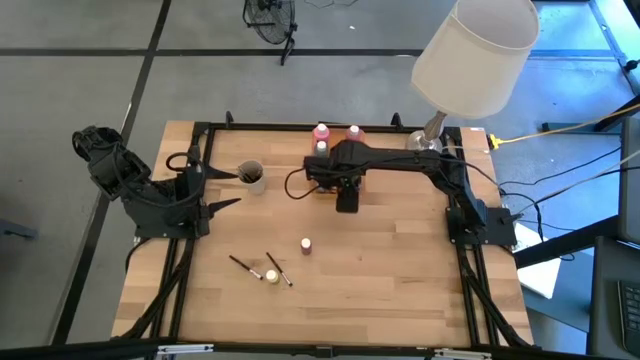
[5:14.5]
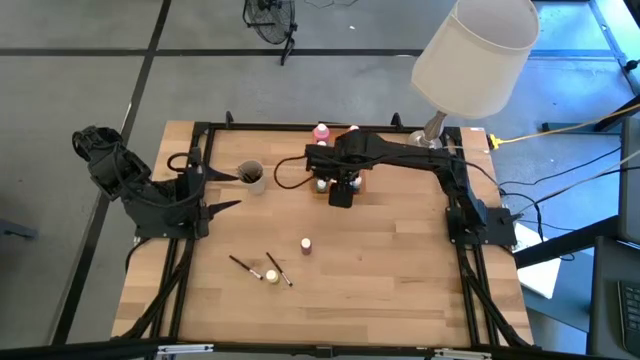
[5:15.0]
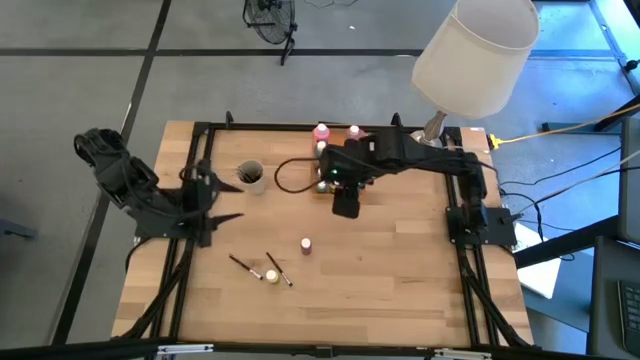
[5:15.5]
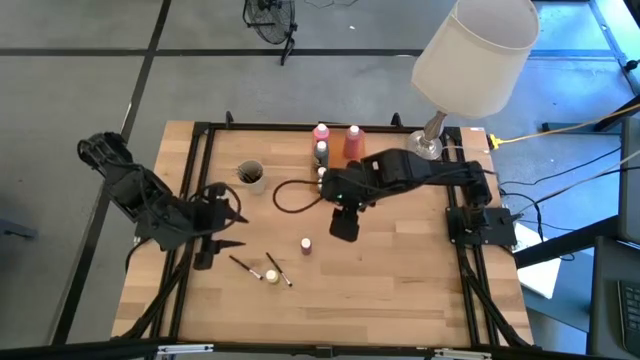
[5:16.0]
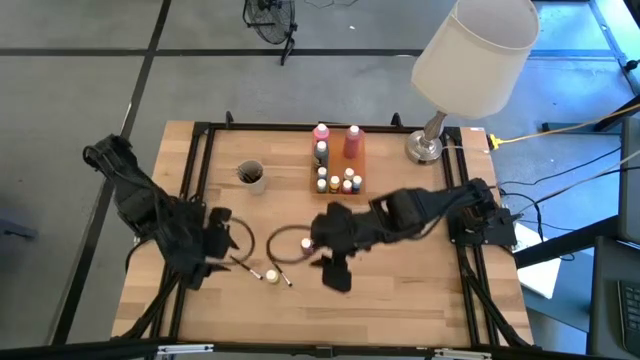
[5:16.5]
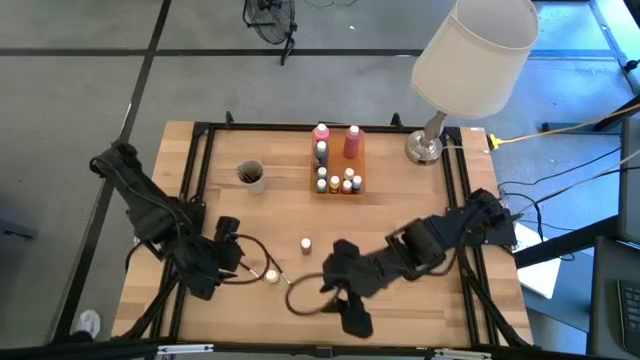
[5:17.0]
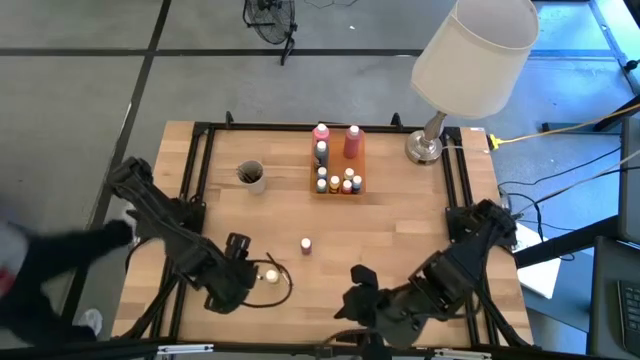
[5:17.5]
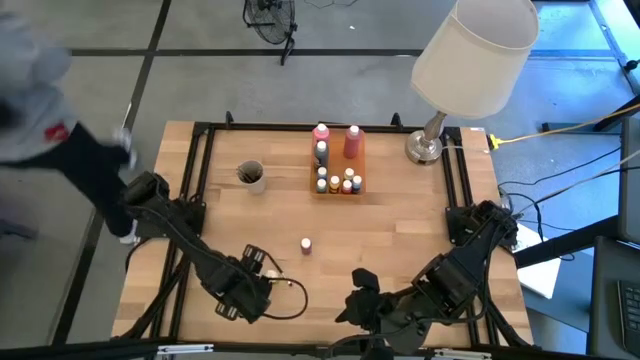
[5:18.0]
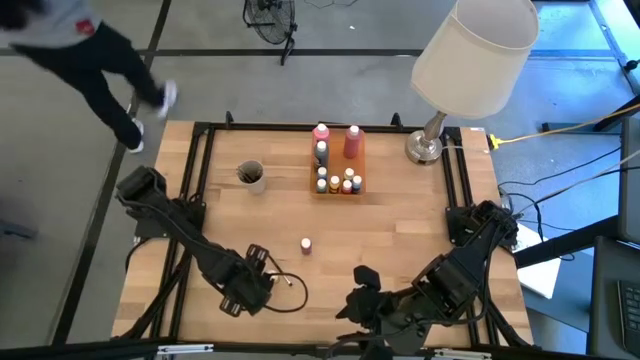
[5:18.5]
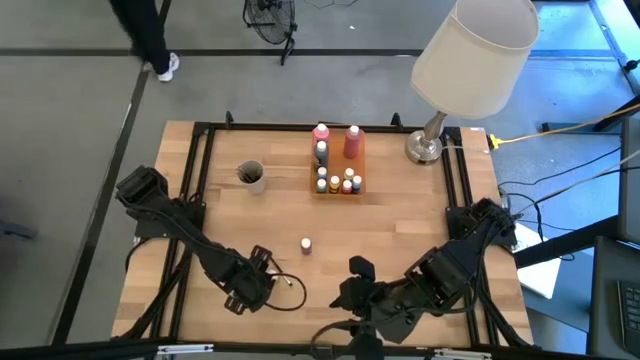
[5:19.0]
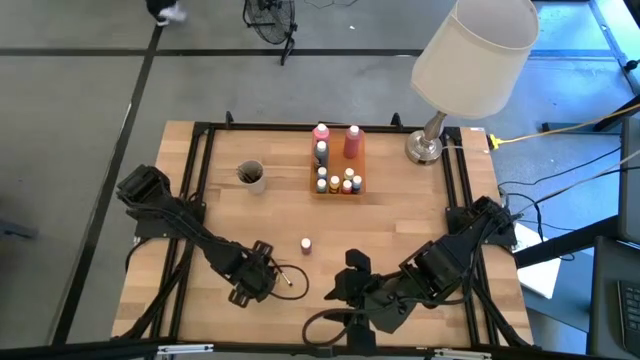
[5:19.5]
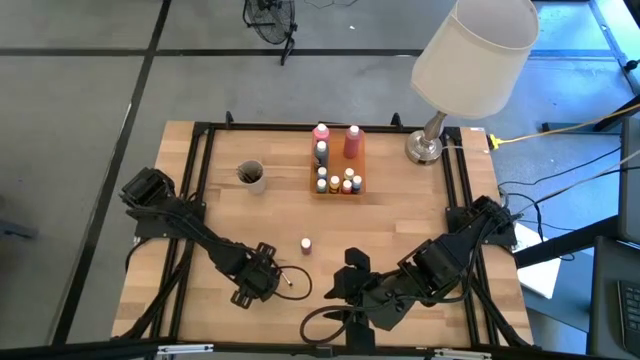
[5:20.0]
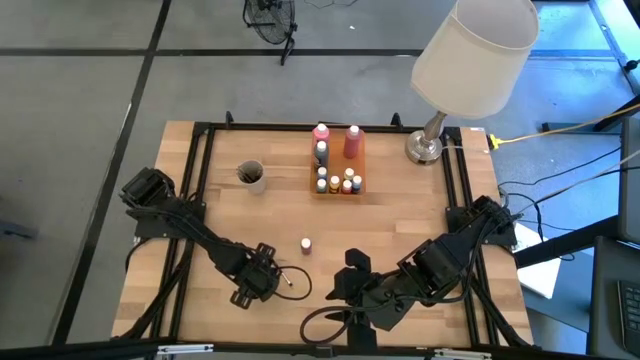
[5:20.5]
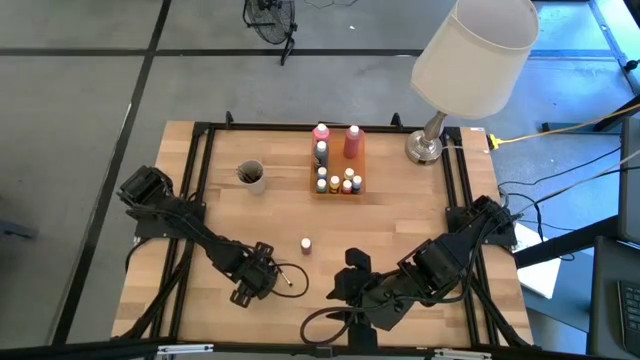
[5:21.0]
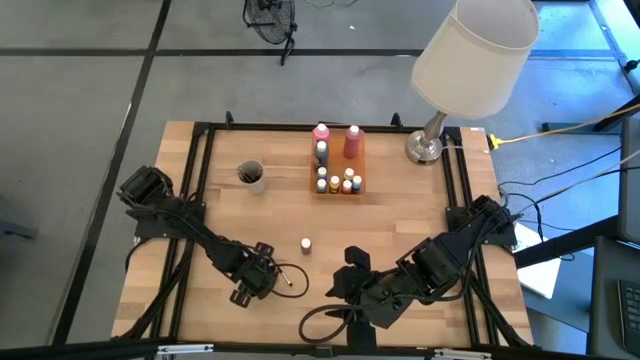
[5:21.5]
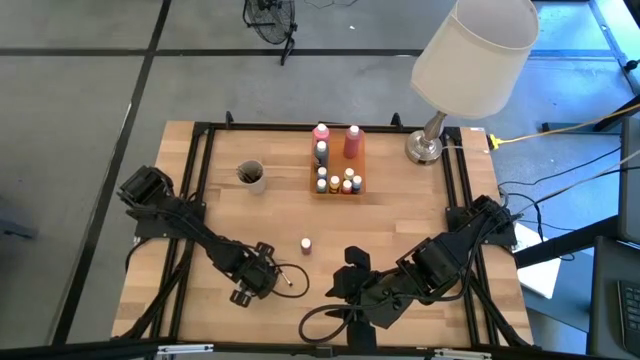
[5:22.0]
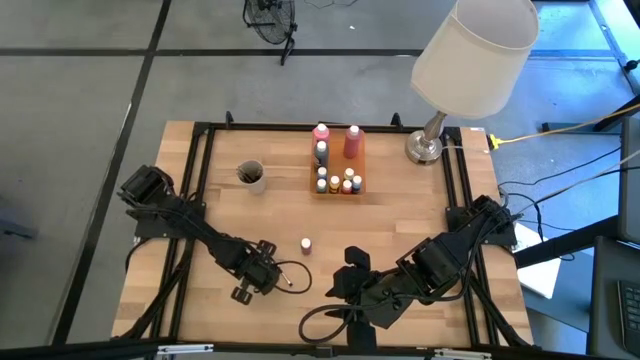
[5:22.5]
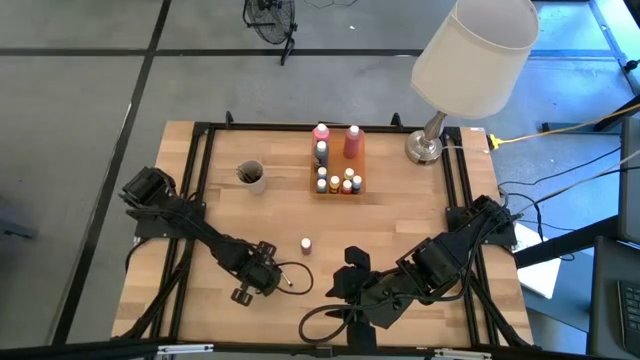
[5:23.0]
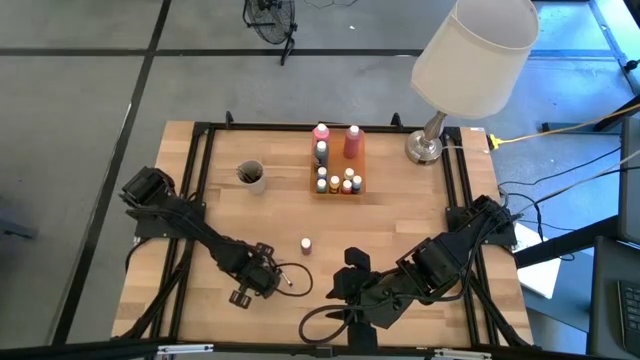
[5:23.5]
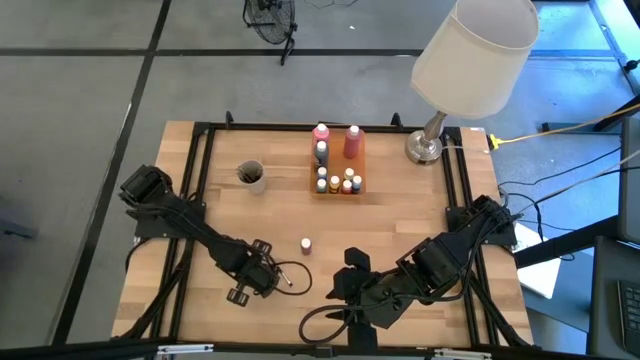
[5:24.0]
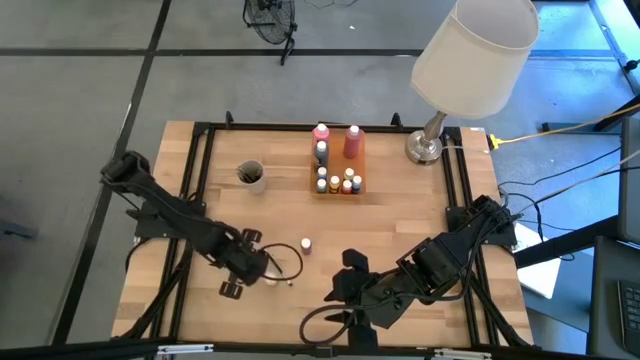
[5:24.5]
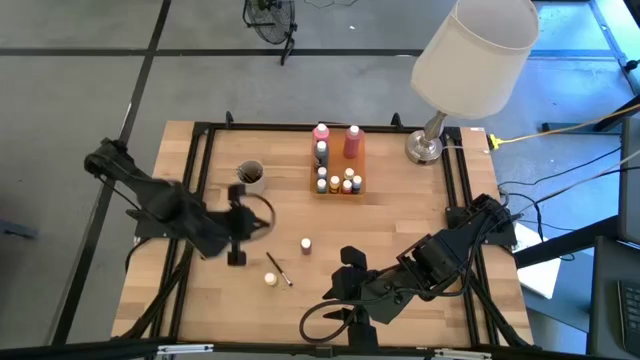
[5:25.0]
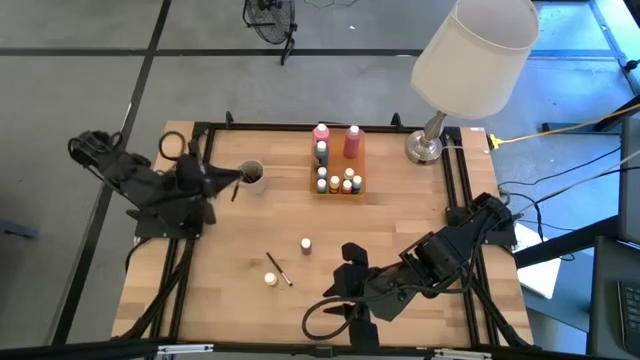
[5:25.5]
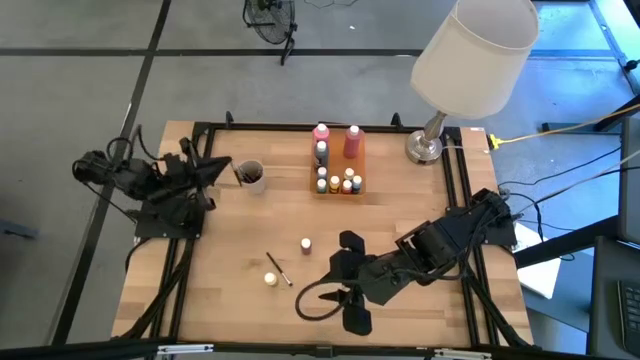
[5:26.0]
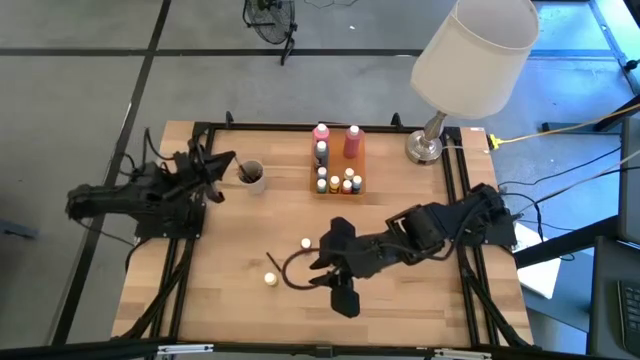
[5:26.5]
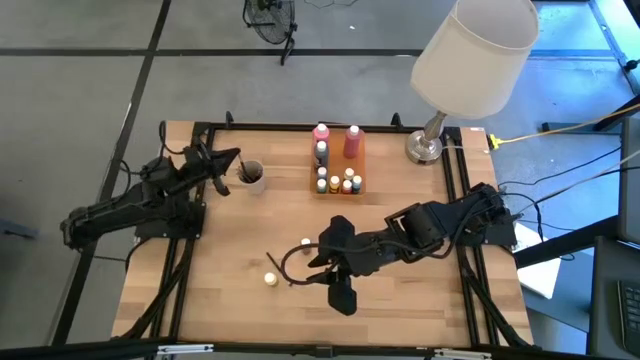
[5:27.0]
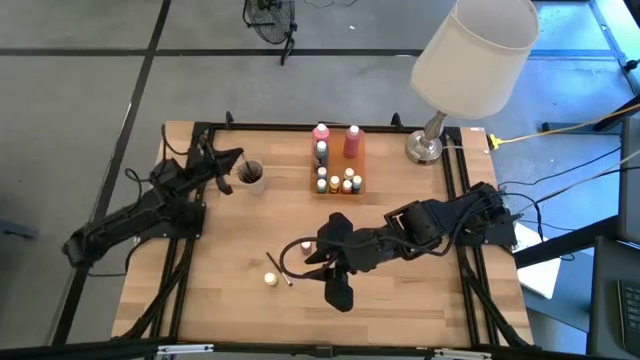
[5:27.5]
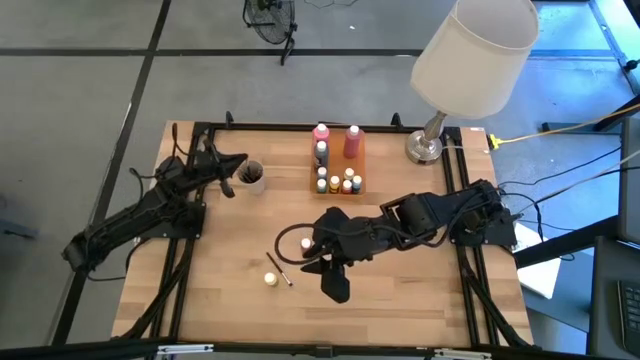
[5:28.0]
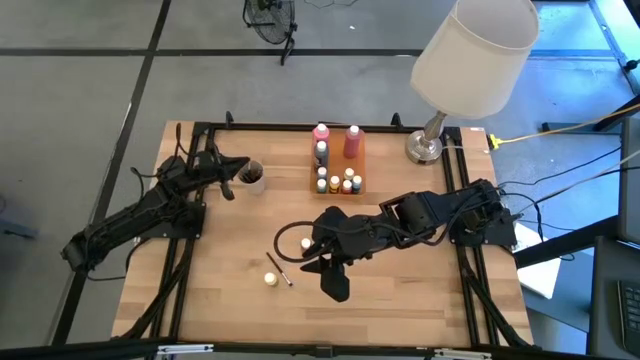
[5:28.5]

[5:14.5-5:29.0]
Task: Pick & Place Paint Supplies
Put the bottom silver paint brush into the white cup

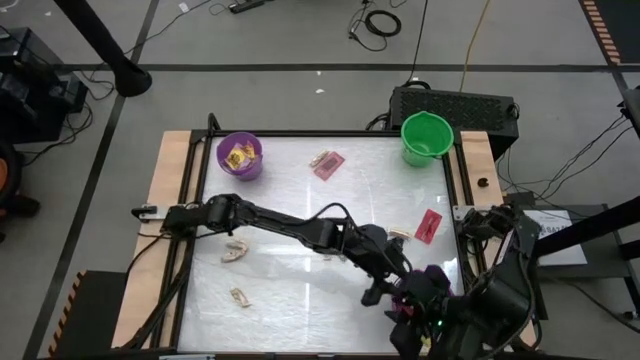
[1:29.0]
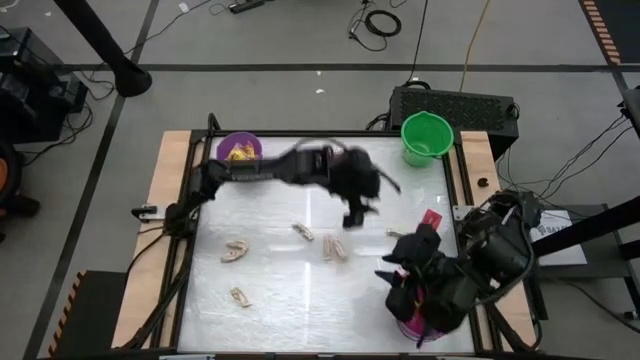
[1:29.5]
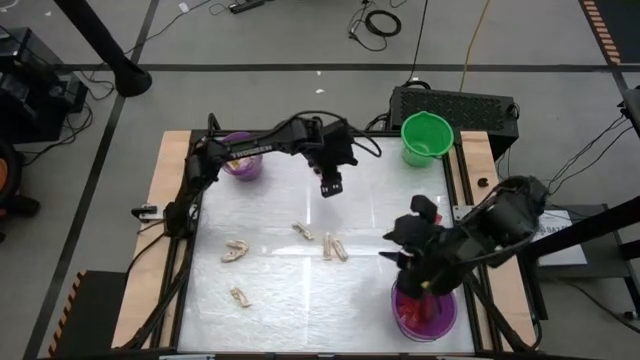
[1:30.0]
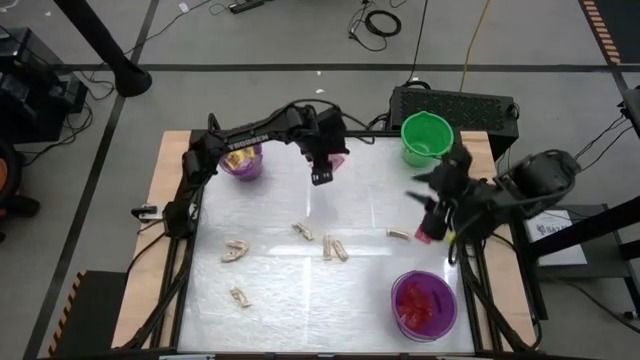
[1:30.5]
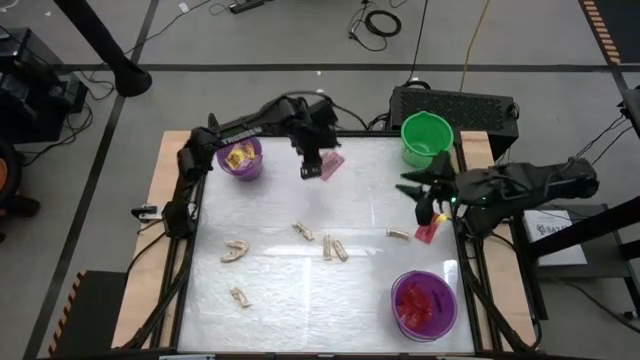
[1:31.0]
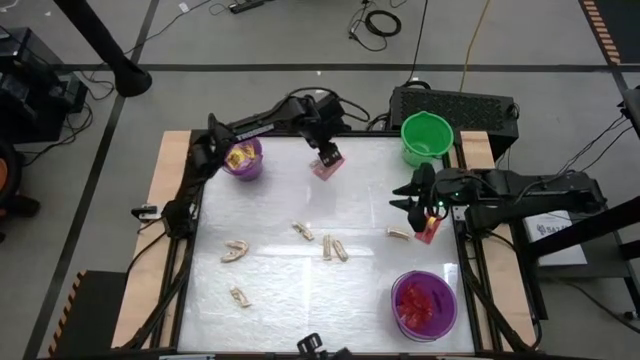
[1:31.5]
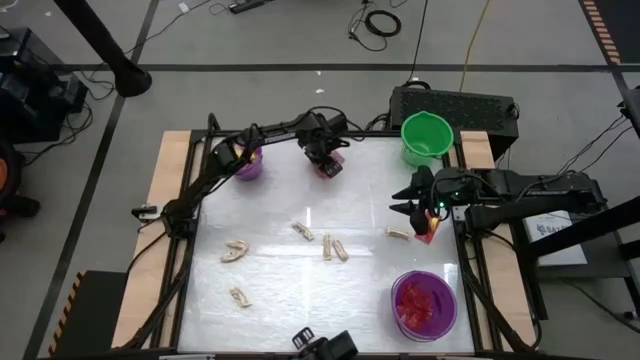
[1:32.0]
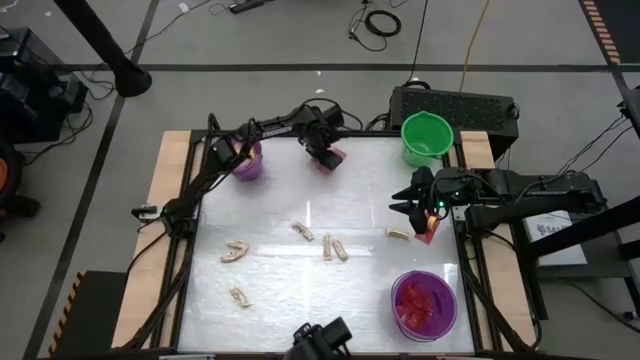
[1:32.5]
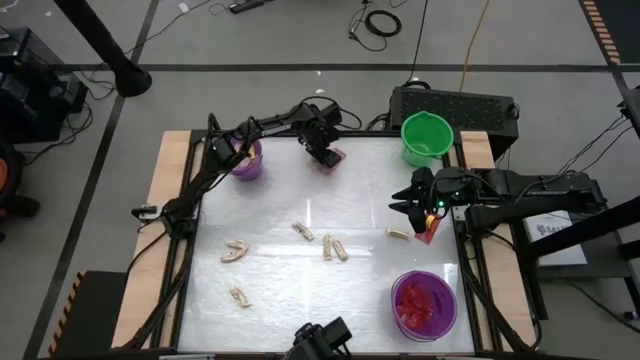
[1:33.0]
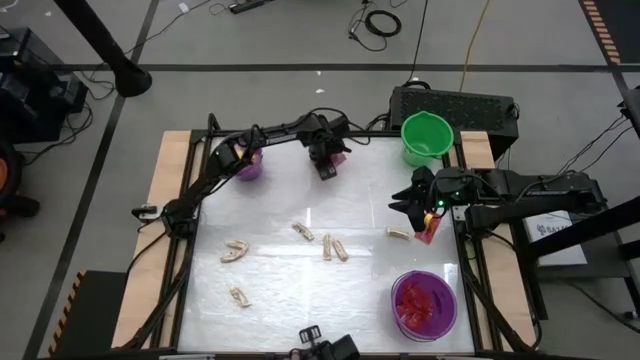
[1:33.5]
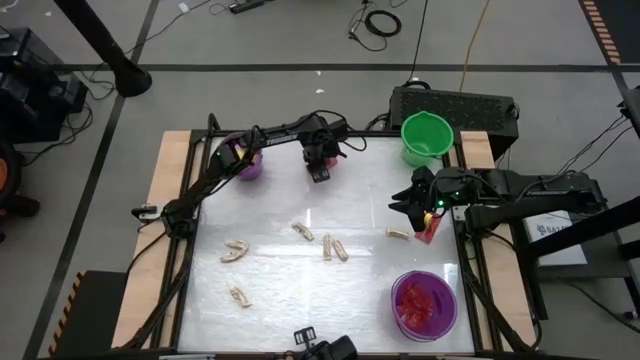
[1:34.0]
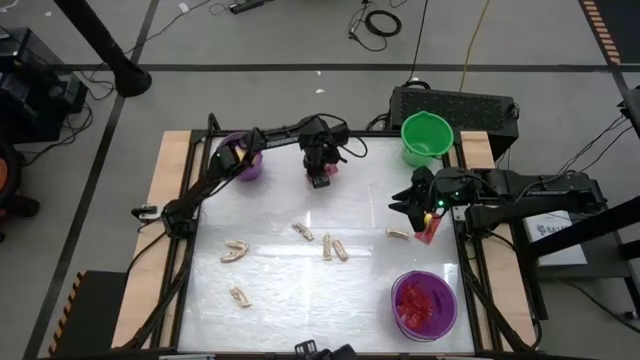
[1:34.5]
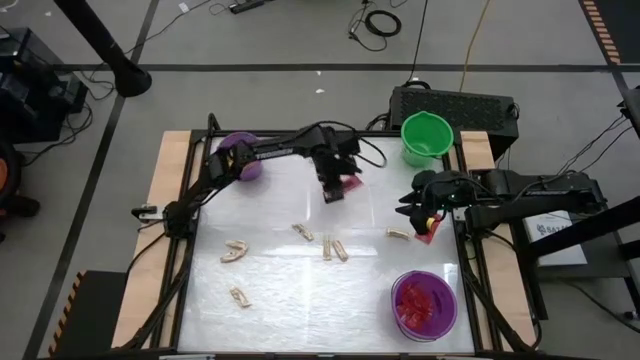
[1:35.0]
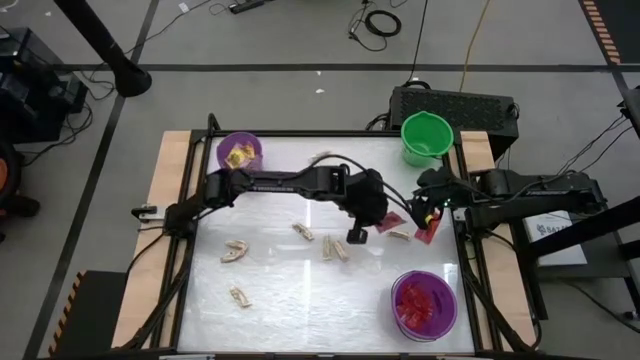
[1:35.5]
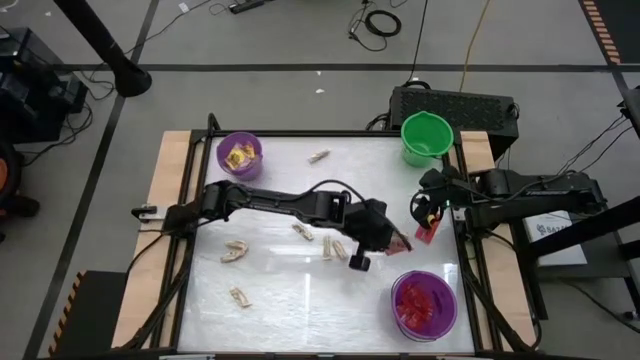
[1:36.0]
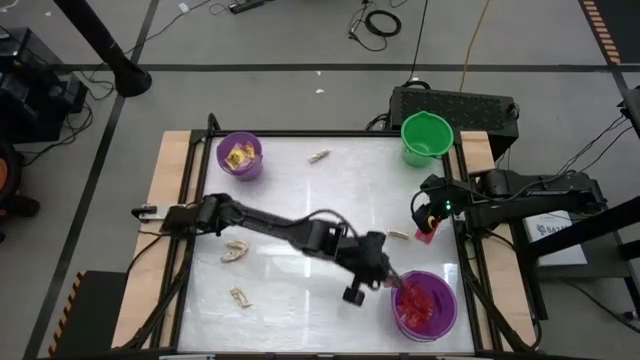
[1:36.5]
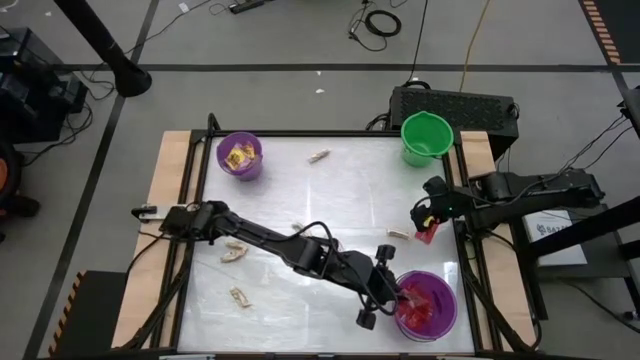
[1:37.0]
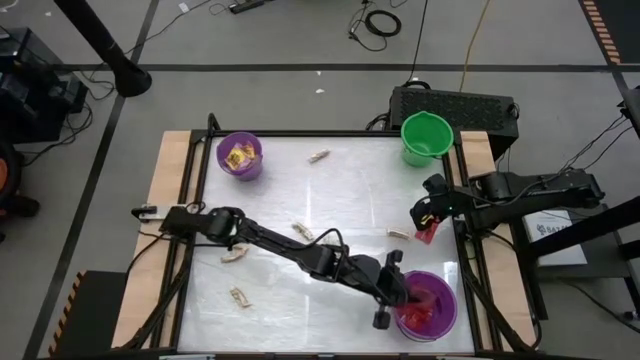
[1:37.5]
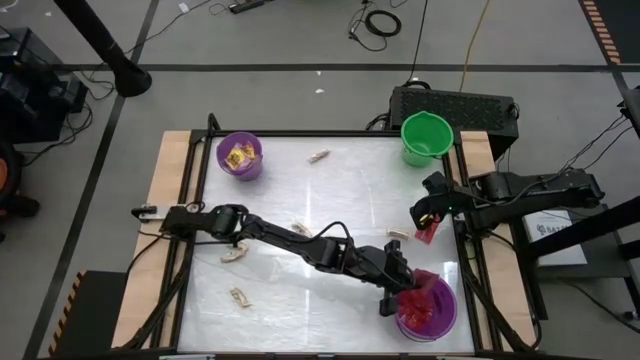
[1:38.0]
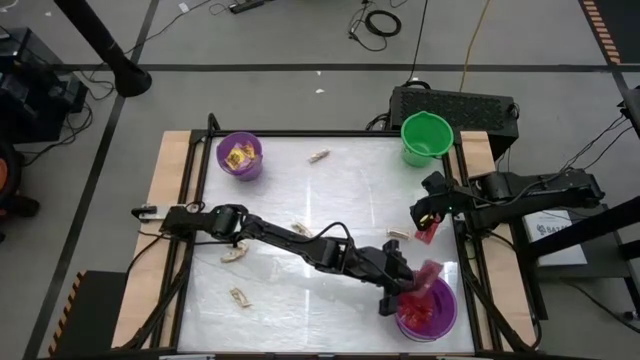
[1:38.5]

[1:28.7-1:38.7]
Task: Sort candy by brand, put in halloween buckets
Put the red candy into the bottom violet bucket
